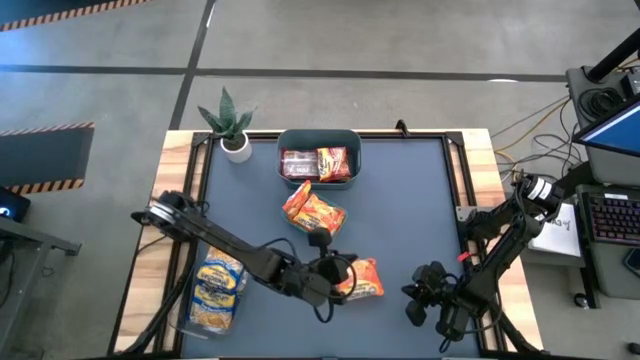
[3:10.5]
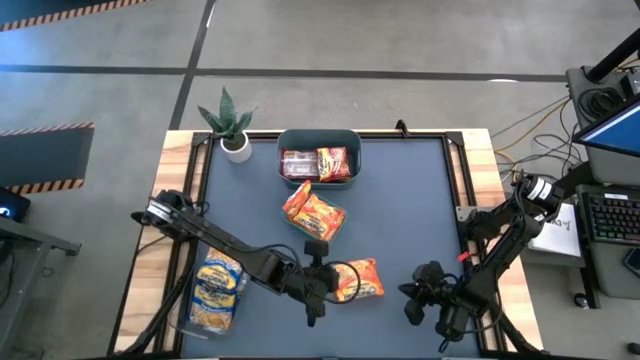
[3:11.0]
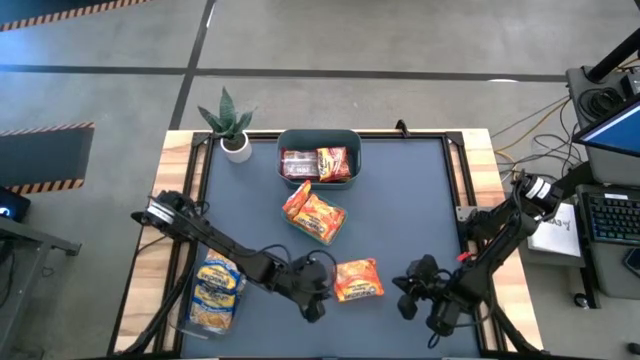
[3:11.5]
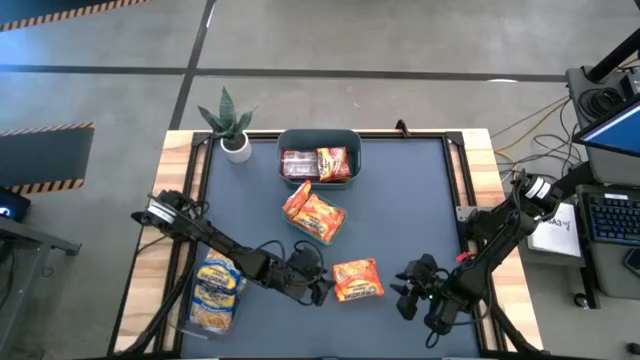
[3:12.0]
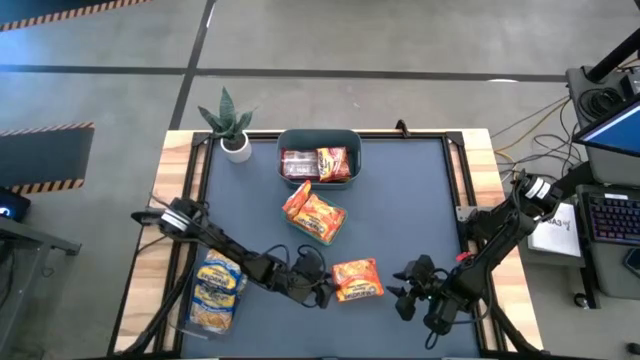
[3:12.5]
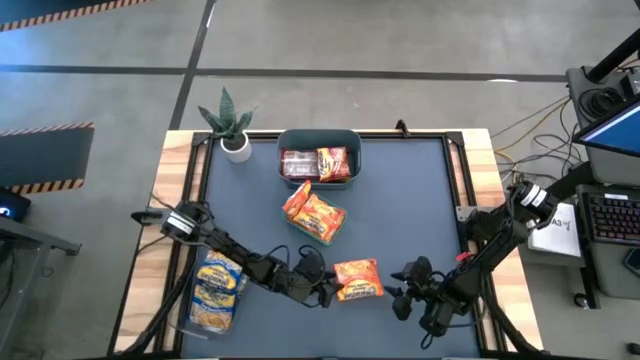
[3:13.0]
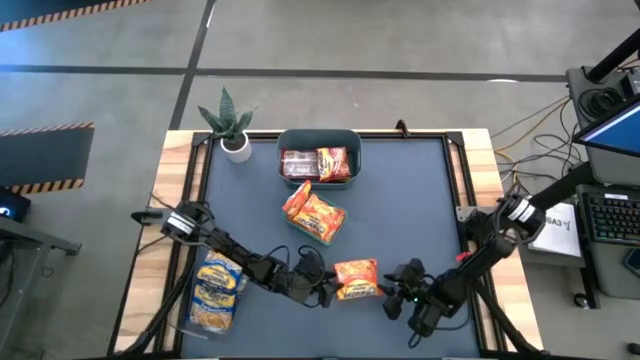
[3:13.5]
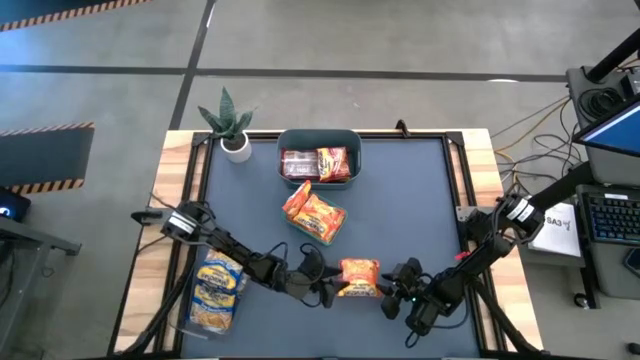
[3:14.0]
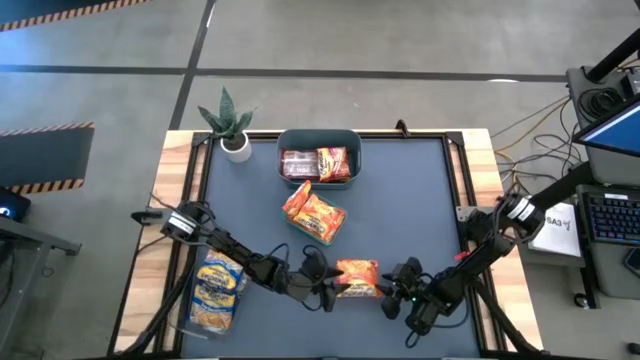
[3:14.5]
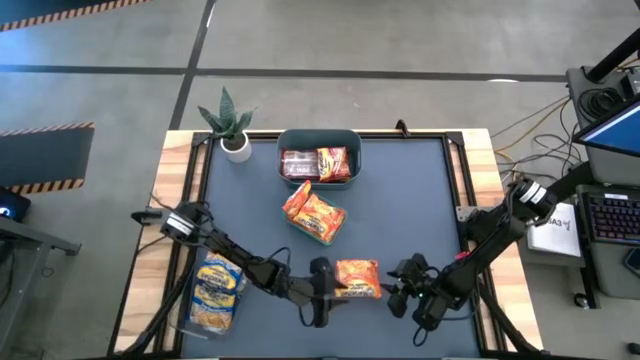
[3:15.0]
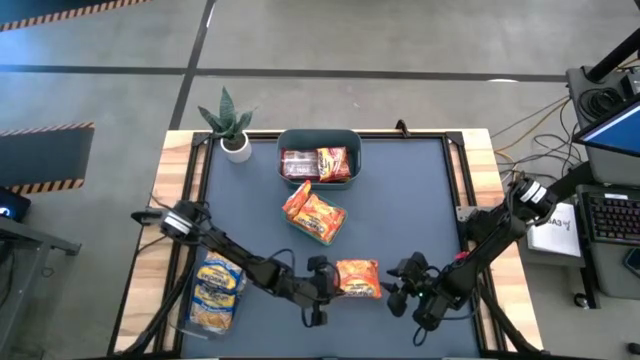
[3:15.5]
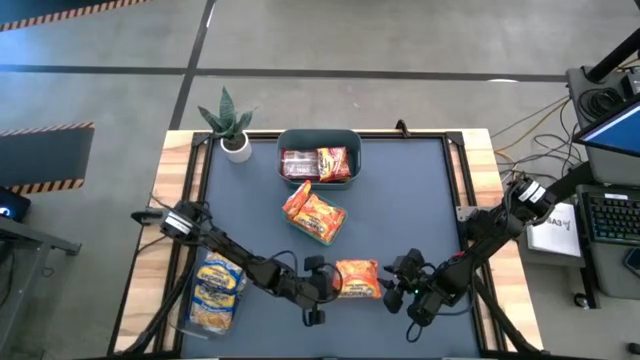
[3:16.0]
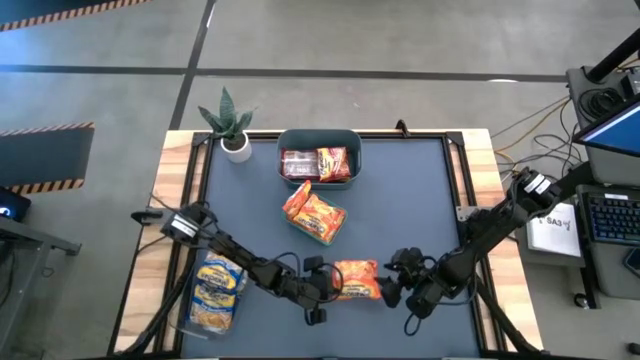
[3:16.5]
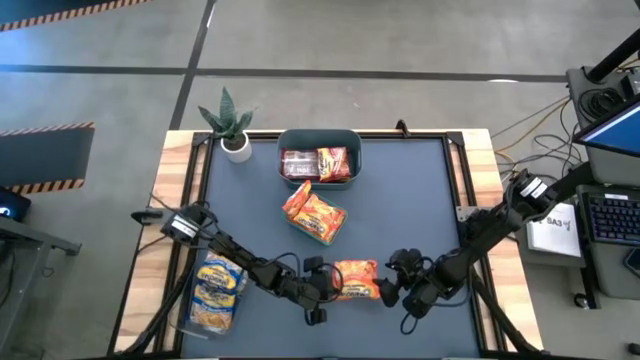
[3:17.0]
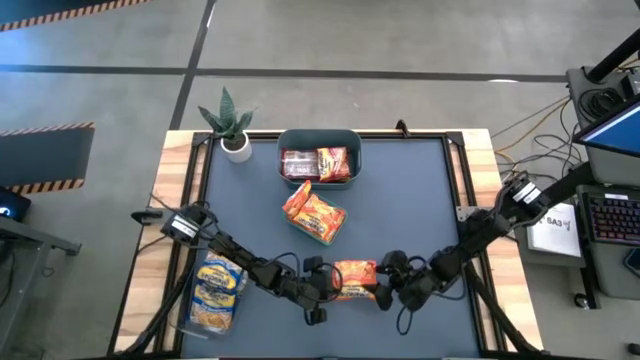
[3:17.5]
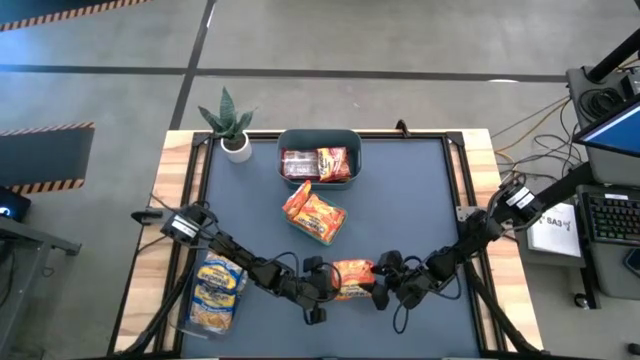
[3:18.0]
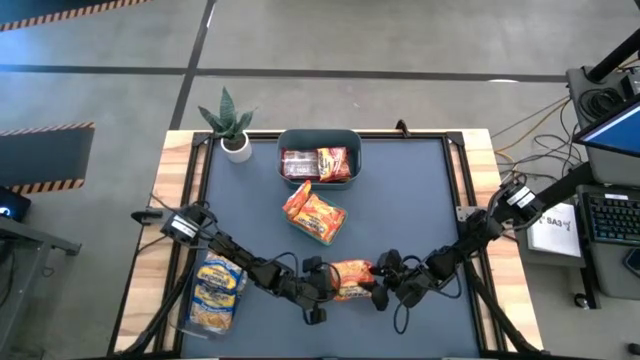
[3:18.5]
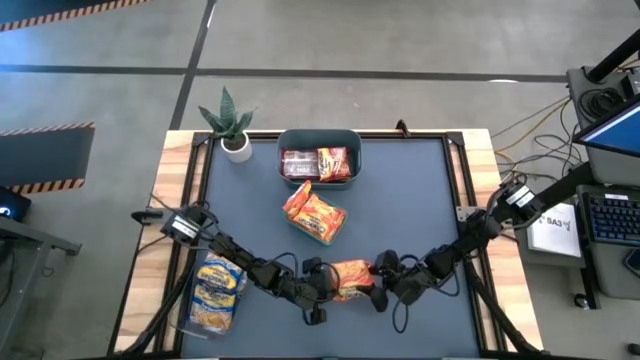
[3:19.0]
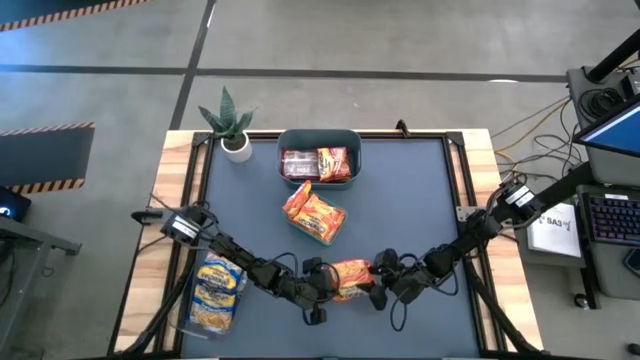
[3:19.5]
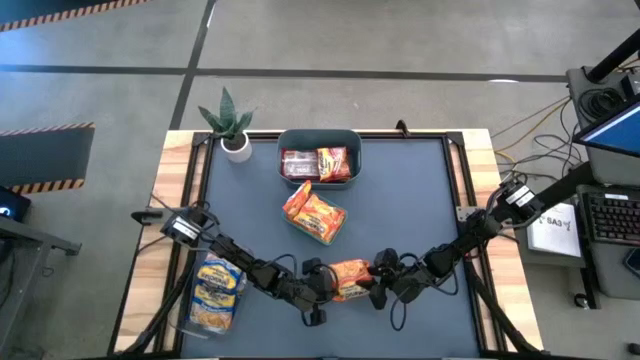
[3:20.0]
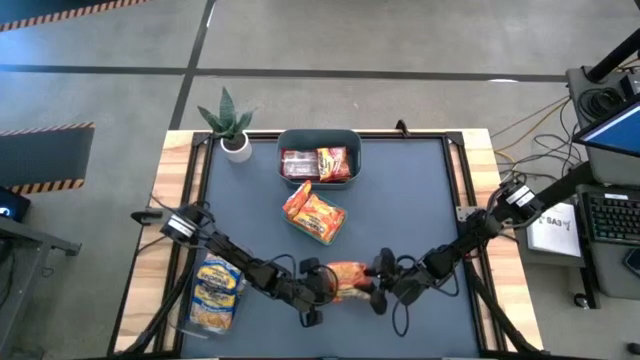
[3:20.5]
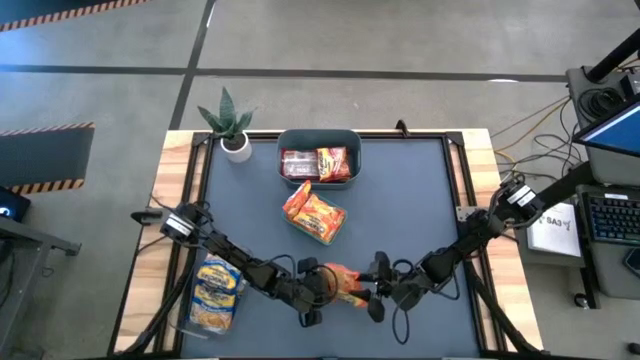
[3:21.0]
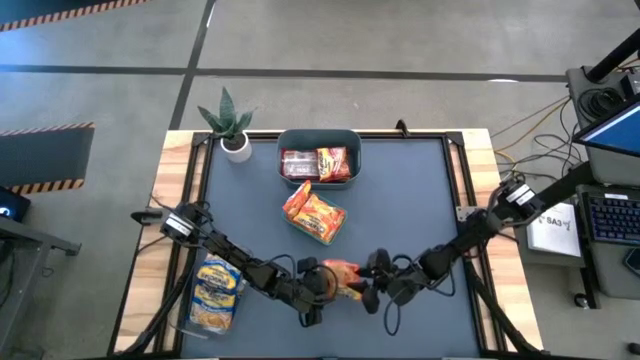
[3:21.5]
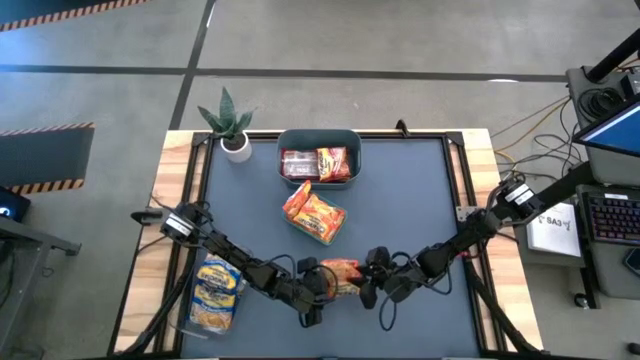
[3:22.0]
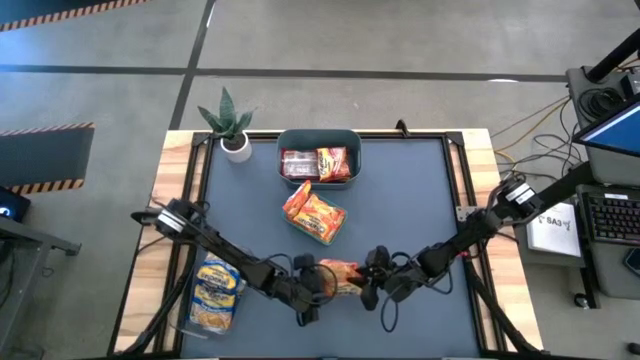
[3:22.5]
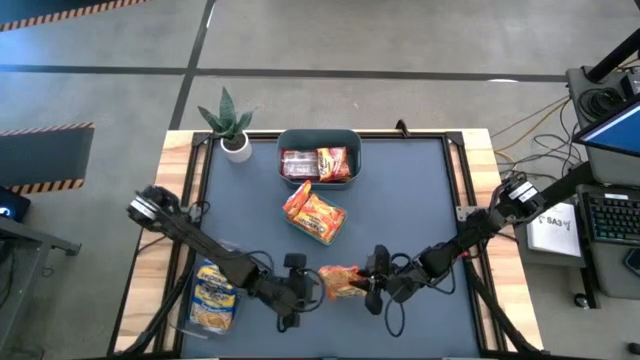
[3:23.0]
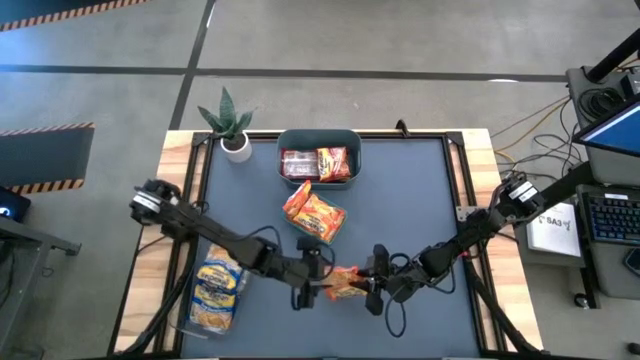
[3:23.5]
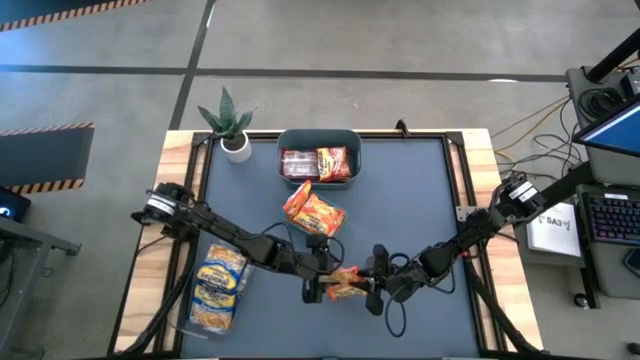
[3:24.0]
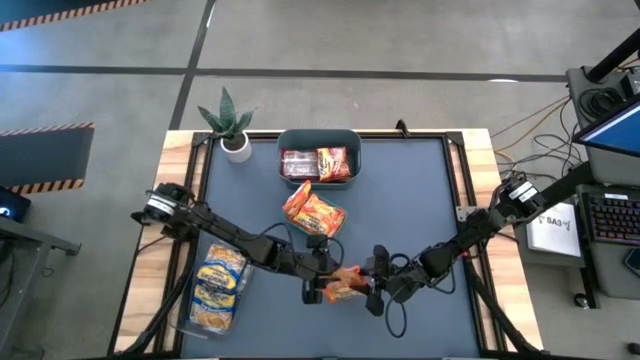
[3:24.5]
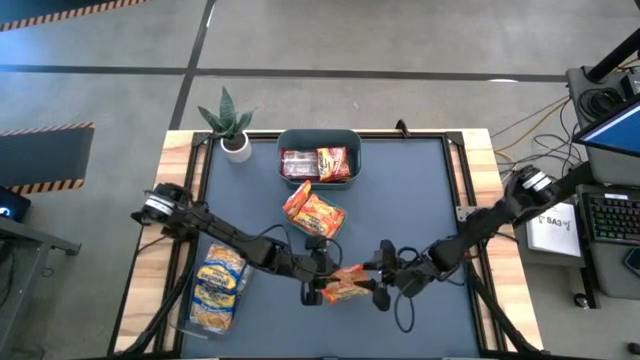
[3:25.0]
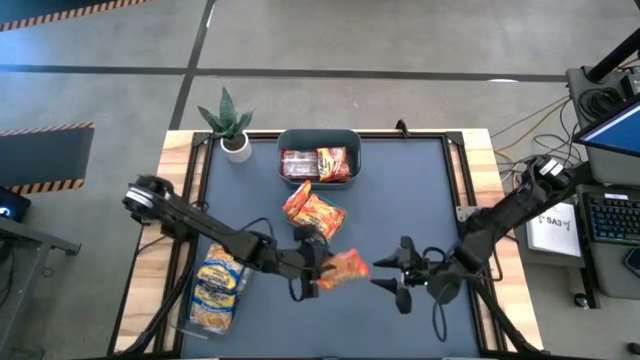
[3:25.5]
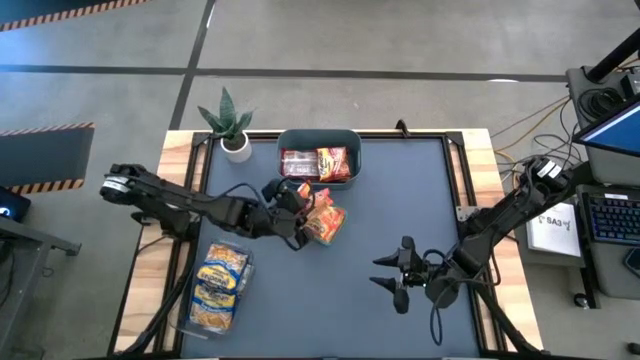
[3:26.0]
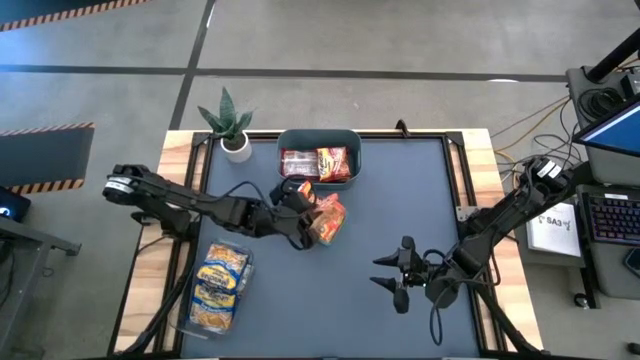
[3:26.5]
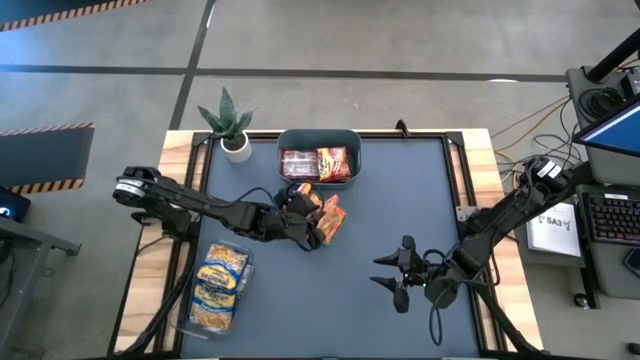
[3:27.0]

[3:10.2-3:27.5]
Task: Sort Maruchan noodles
Put the orange noodle pack into the green bin

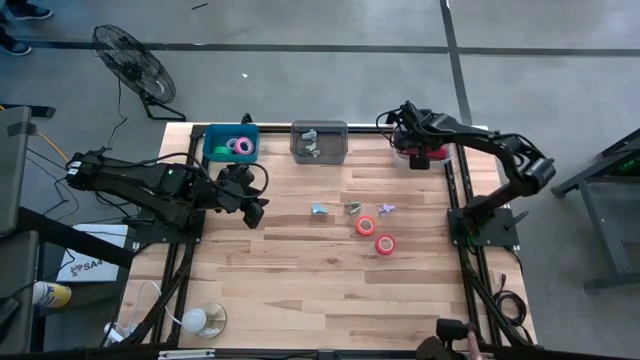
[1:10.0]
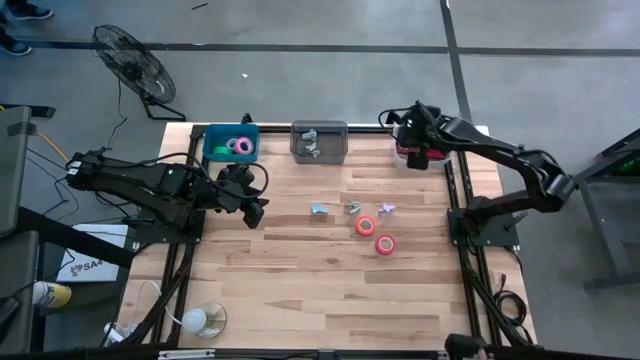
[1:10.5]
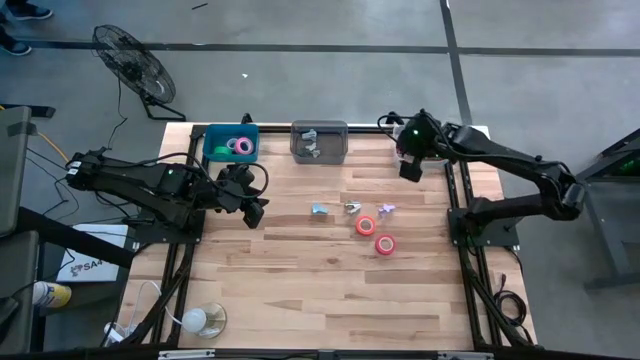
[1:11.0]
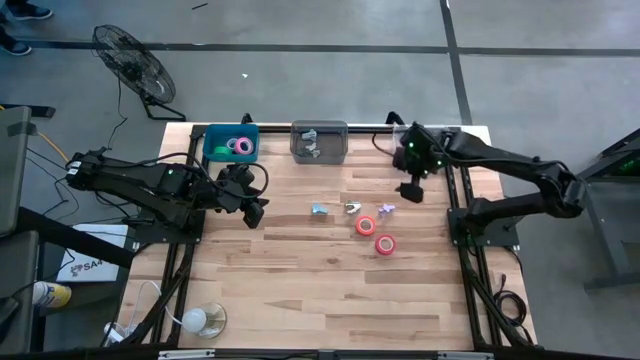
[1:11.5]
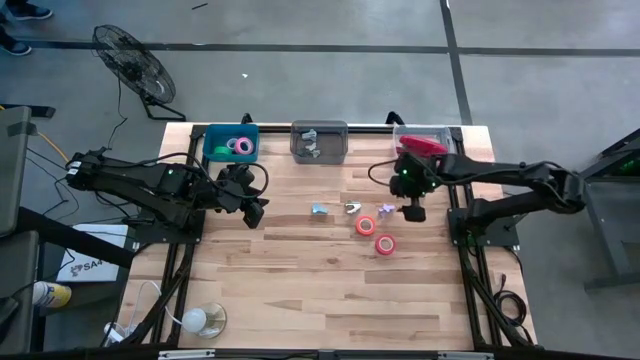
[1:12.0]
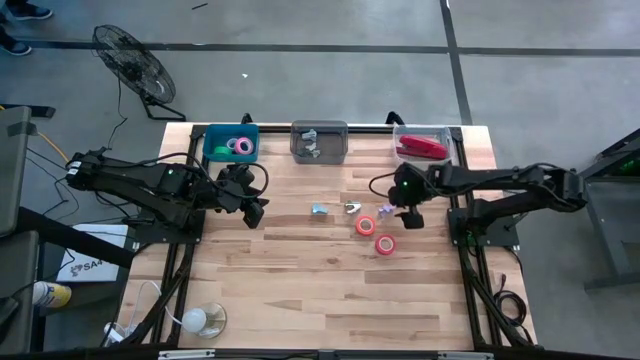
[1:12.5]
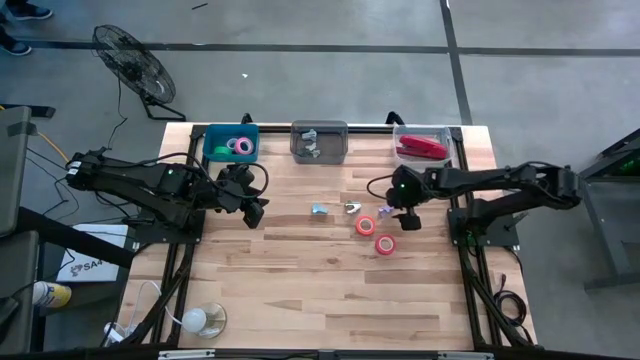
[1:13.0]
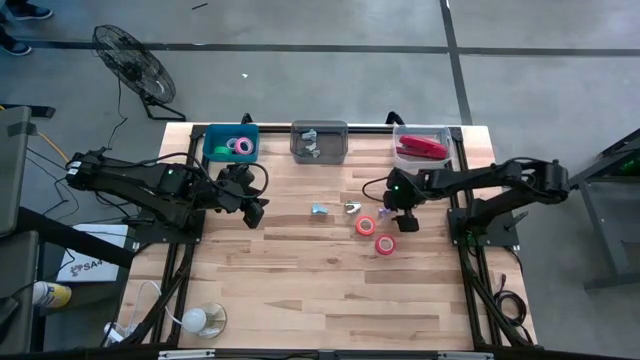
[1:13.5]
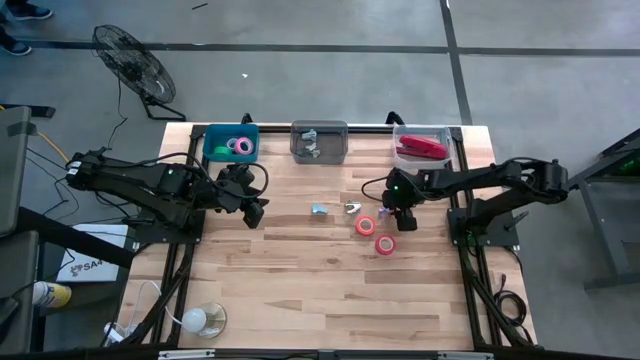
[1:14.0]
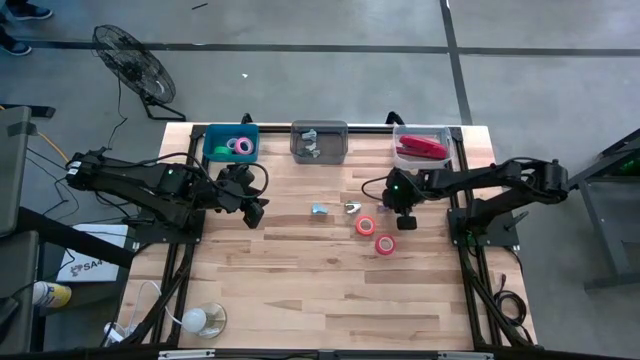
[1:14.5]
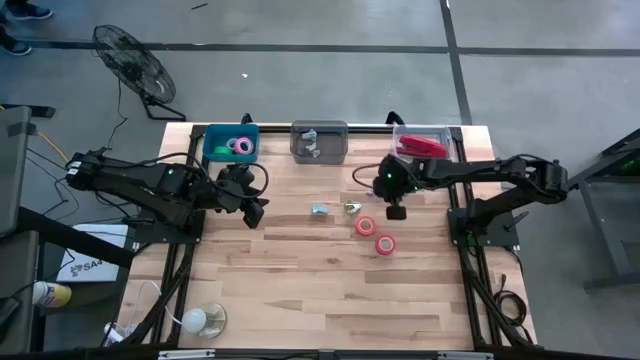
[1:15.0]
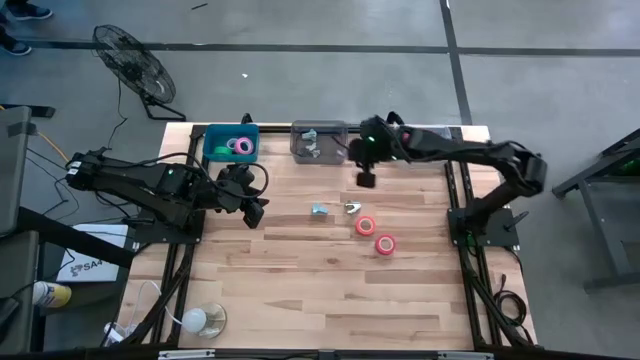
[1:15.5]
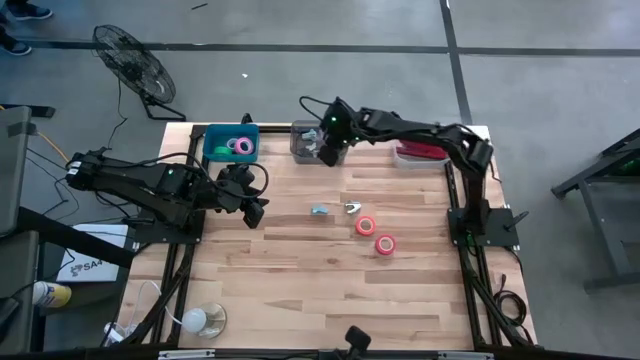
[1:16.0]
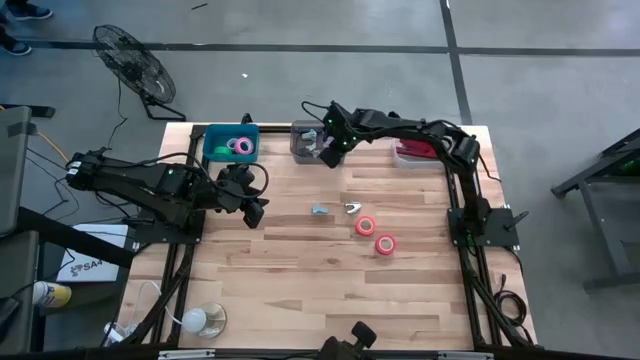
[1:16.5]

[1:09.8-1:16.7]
Task: Pick and place Stapler, Stapler remover, tape
Put the purple staple remover into the black bin
